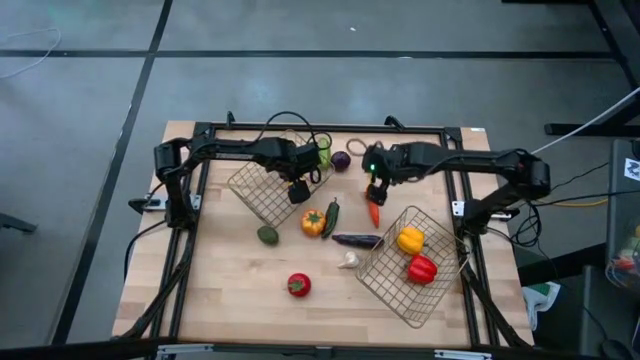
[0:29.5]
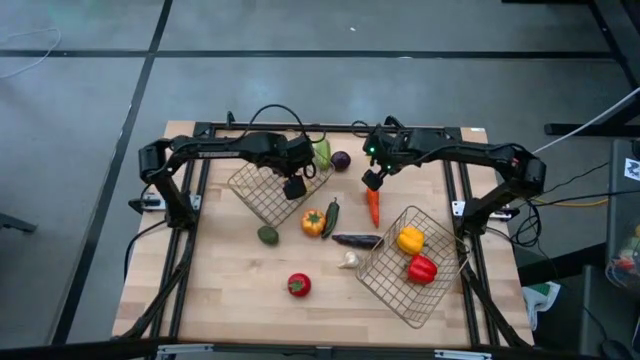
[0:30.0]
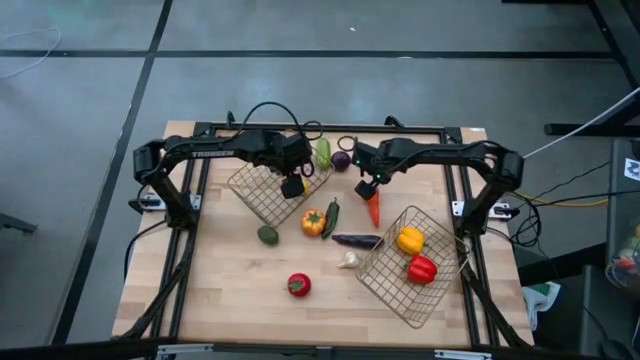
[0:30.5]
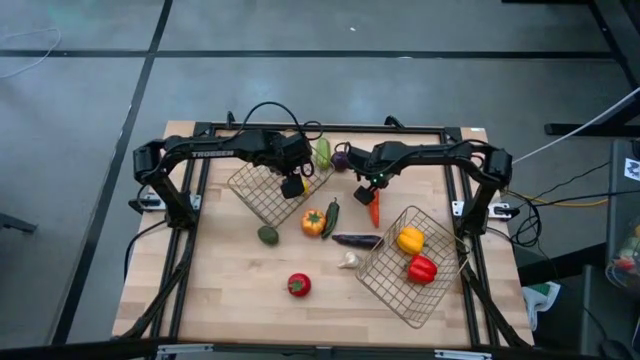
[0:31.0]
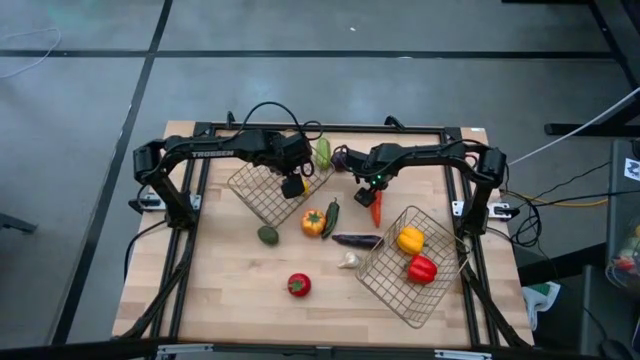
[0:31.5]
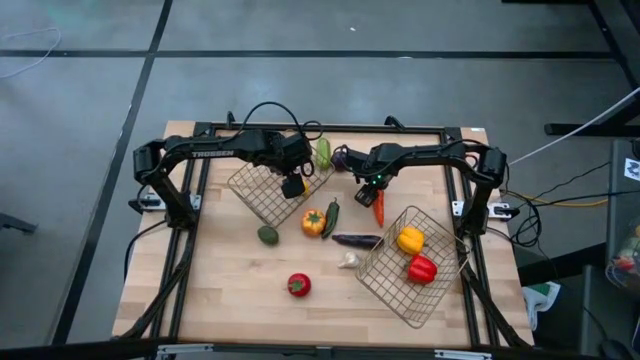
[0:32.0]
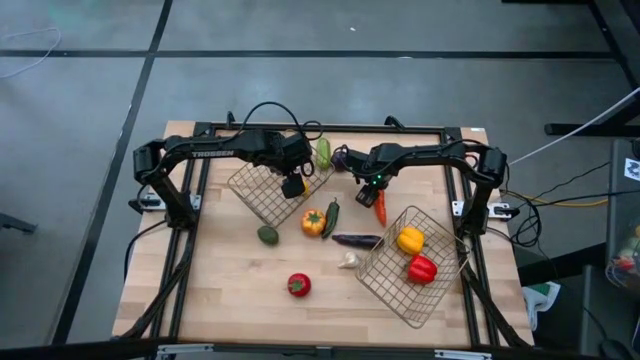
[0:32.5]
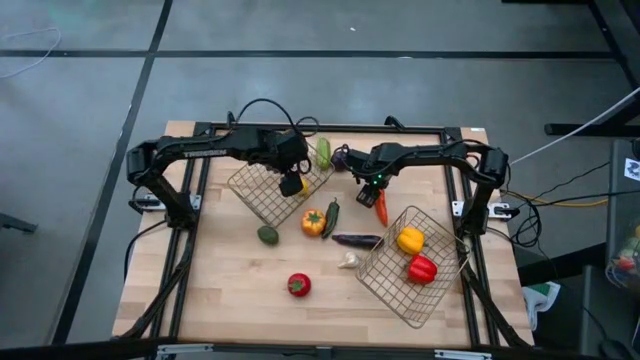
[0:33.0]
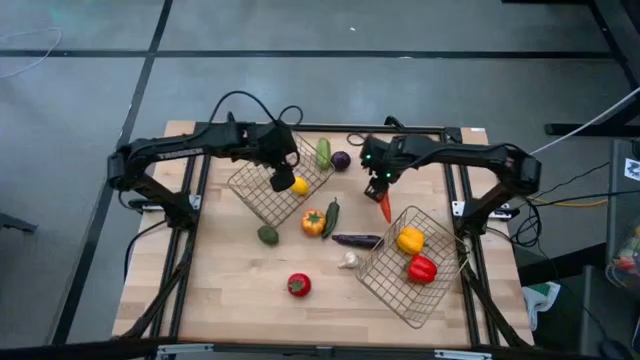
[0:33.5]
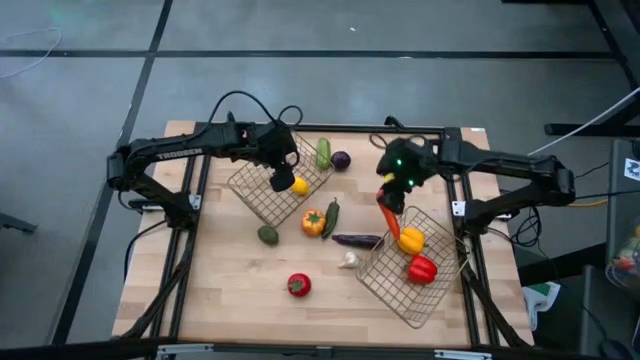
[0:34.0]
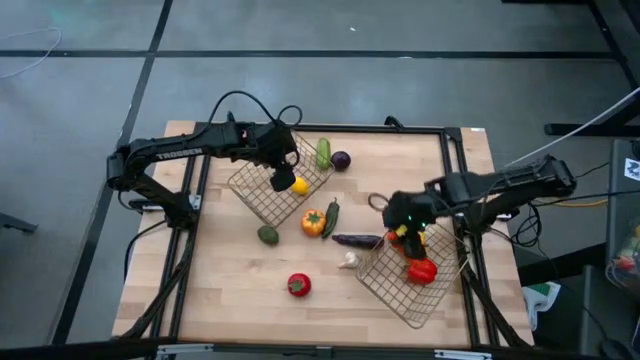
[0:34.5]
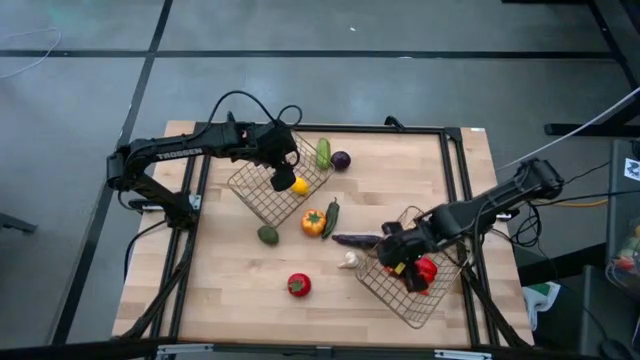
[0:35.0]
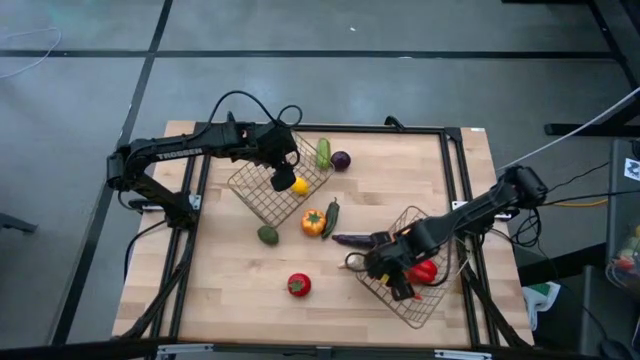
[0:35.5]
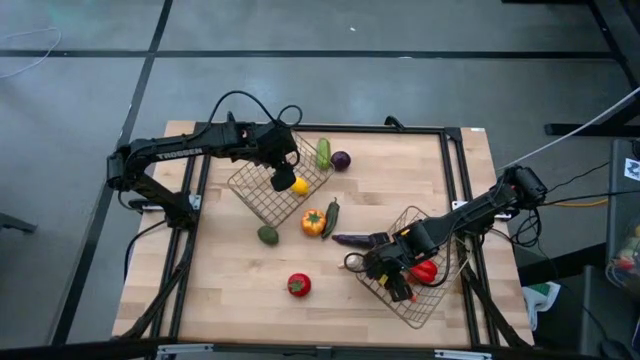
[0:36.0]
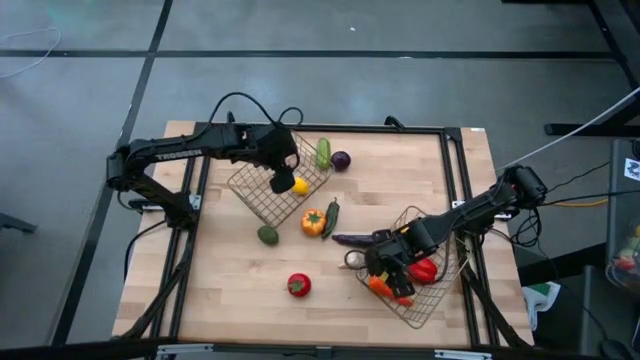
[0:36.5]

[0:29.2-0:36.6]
Task: Sort produce into baskets
Put the carrot into the bottom basket

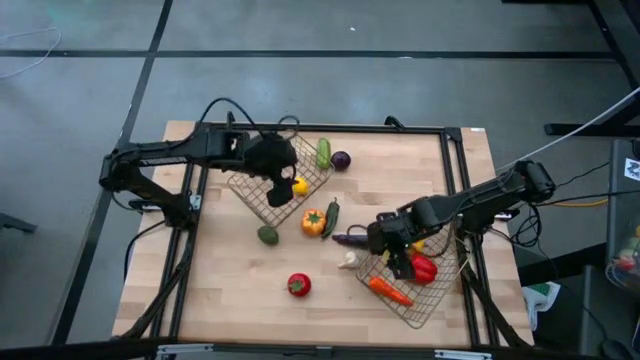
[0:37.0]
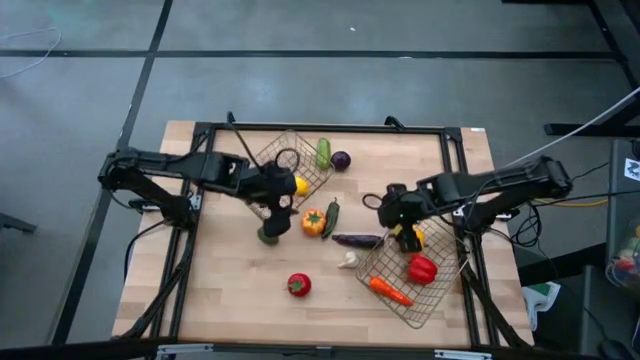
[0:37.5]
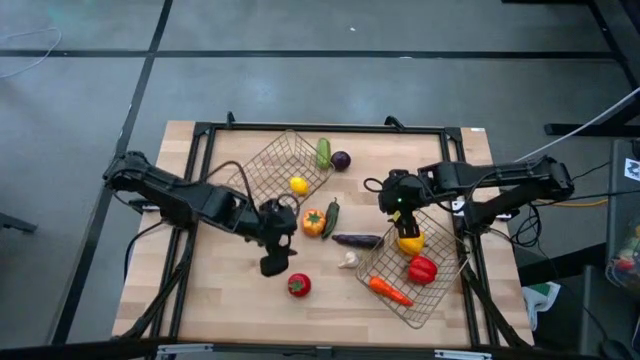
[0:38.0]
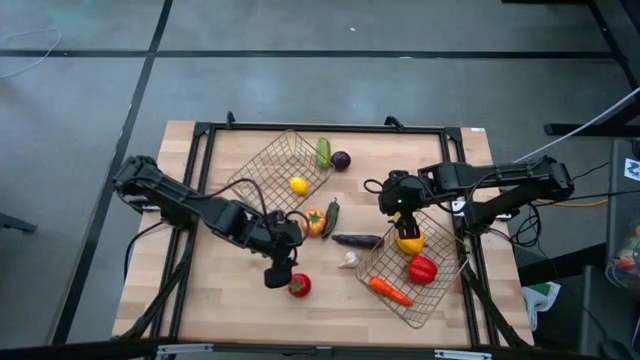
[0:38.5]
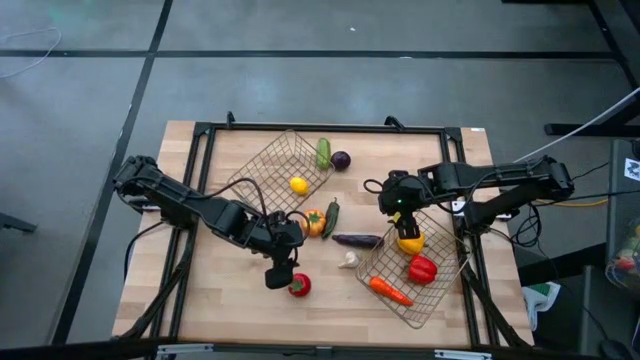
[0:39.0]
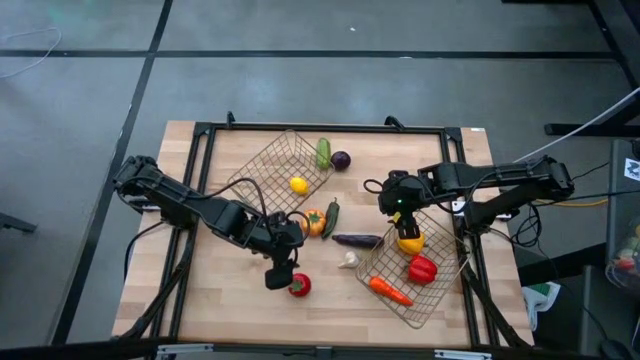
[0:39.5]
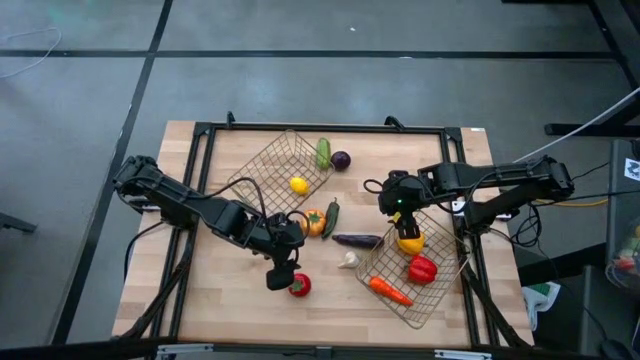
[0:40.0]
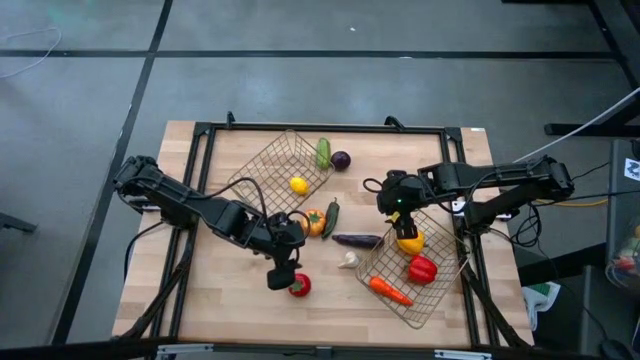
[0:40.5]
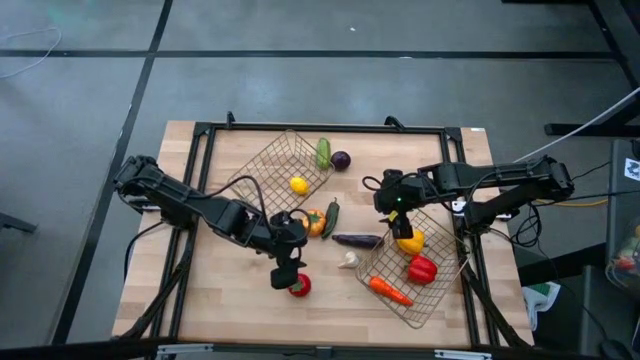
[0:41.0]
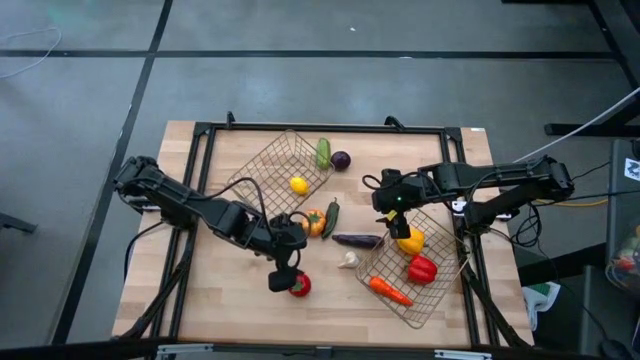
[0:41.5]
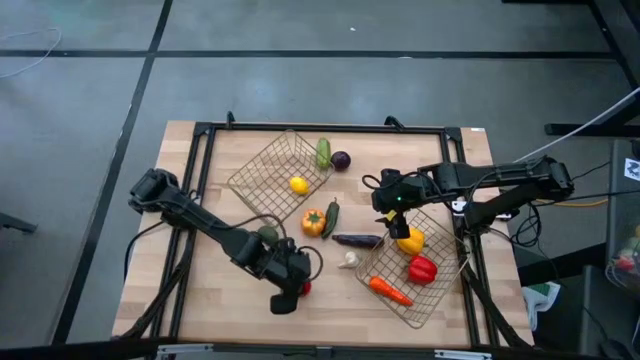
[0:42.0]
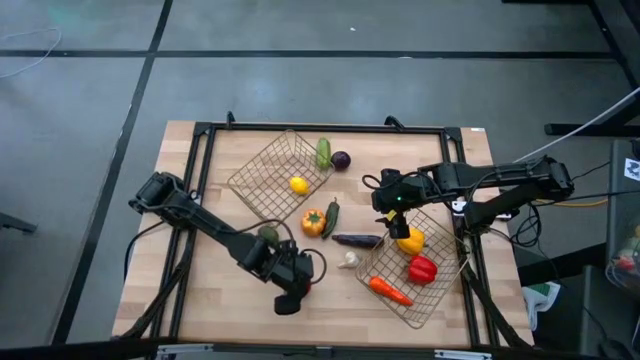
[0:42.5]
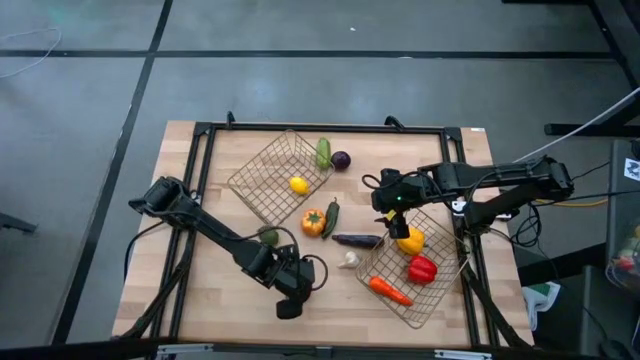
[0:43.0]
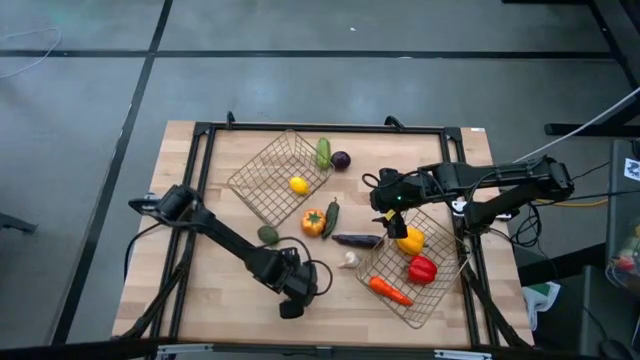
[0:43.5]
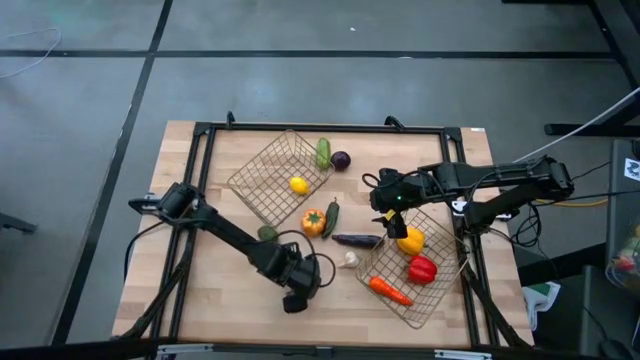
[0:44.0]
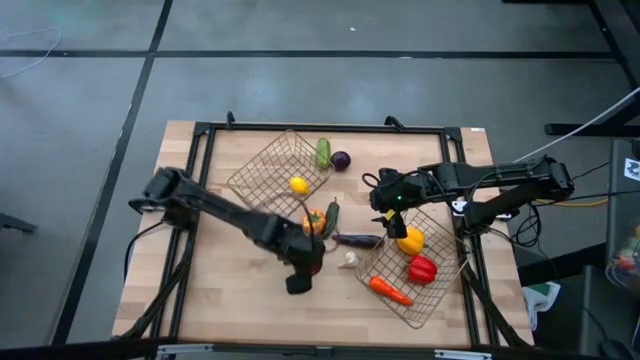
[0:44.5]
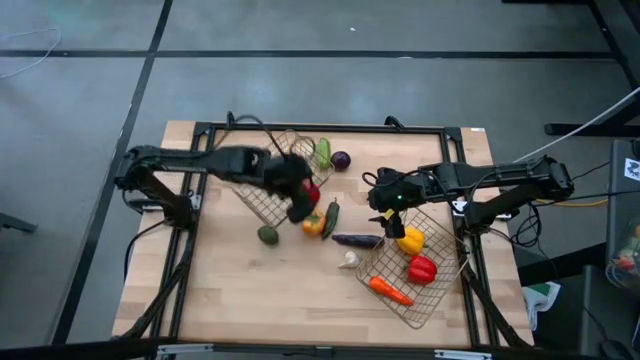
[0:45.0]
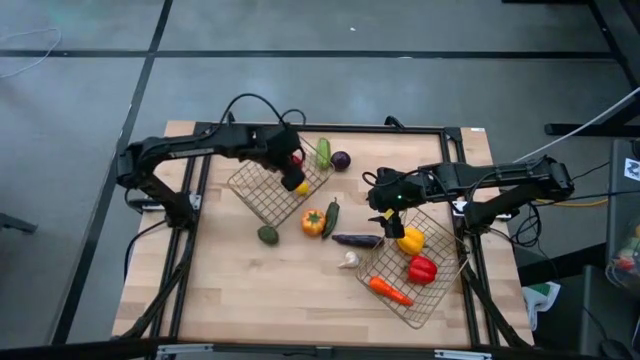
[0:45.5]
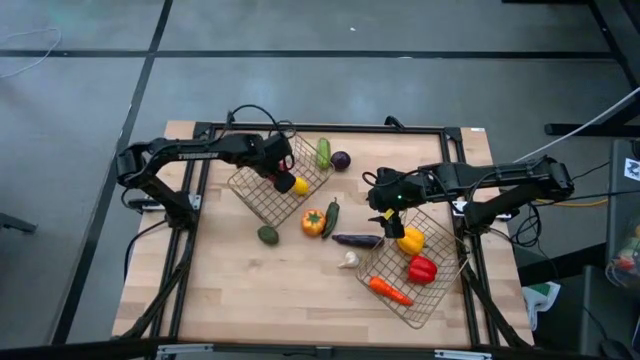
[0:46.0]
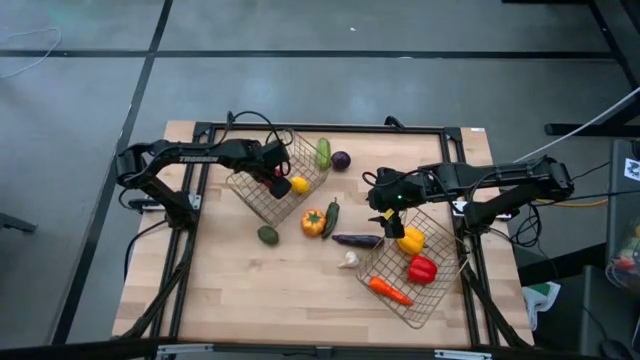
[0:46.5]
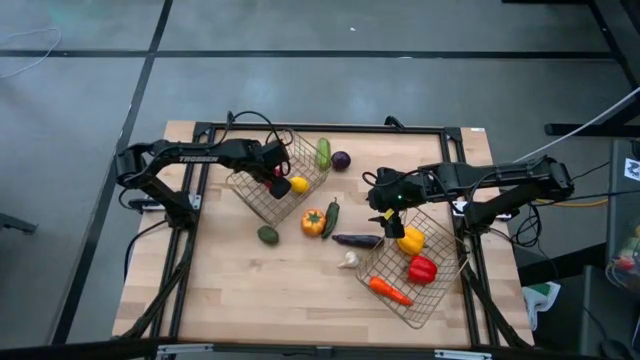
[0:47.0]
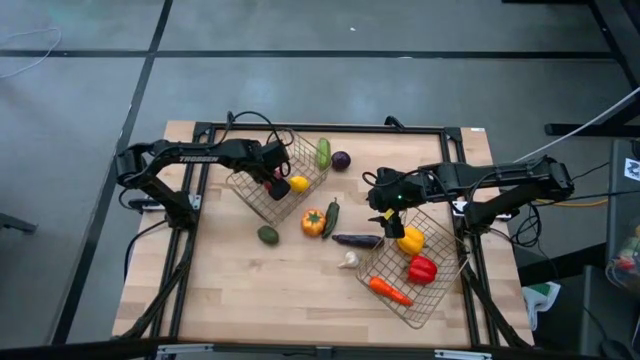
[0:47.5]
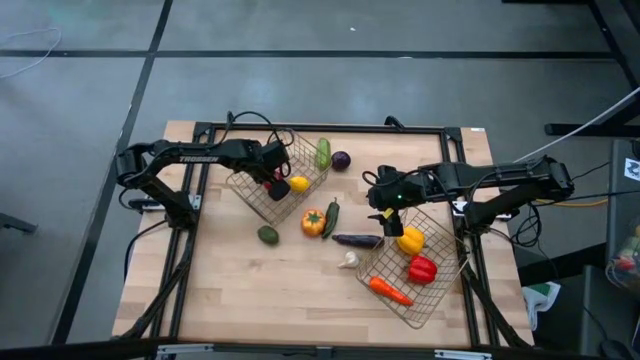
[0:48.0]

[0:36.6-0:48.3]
Put the tomato into the top basket

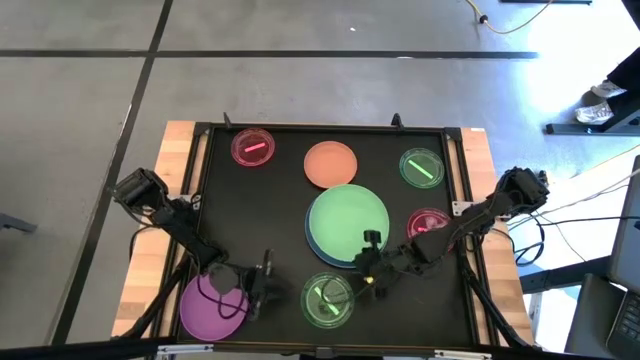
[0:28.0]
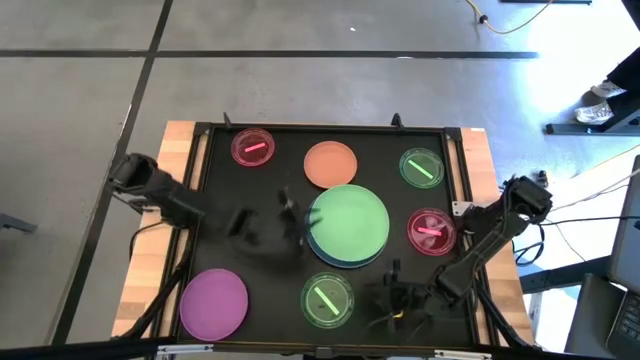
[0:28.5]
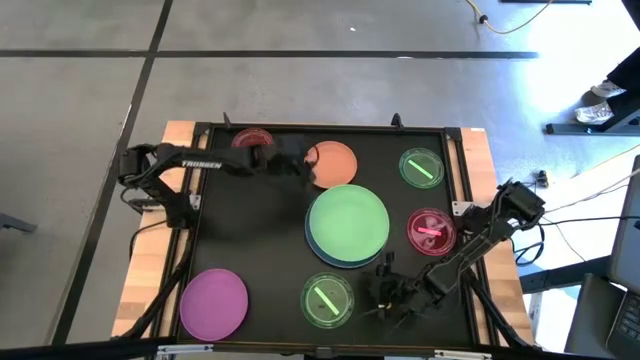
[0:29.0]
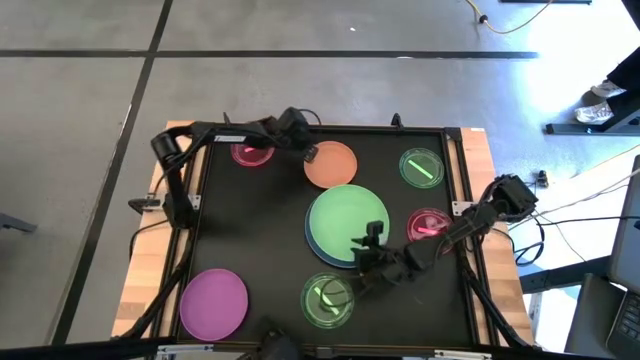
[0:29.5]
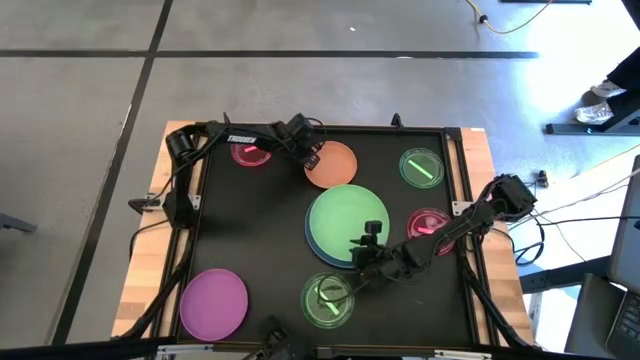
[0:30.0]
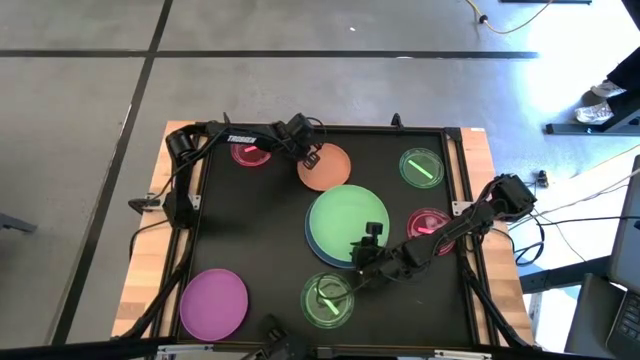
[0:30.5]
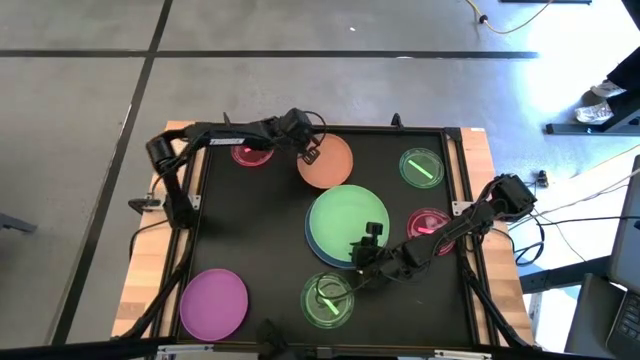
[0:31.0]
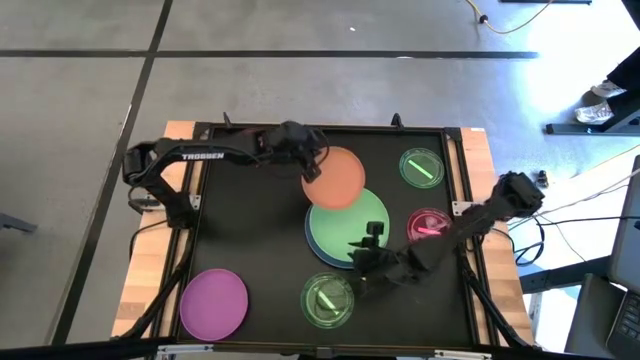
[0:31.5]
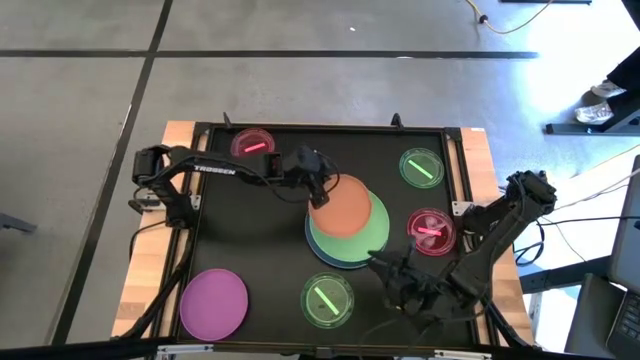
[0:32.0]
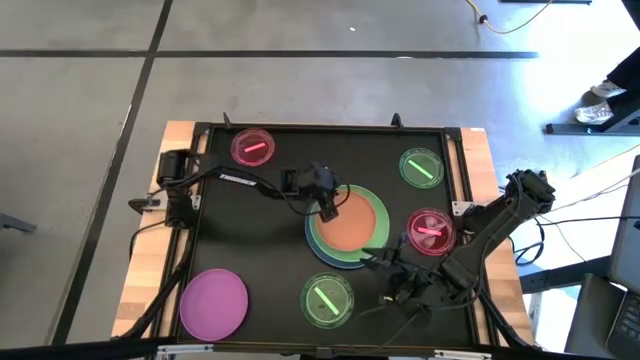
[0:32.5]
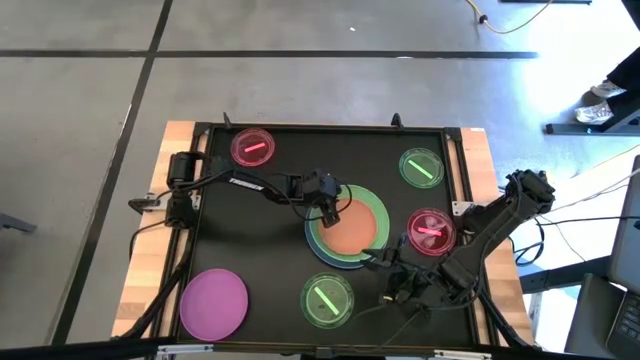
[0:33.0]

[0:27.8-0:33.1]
Task: Stack plastic plates
Stack the orange plate on top of the green plate
